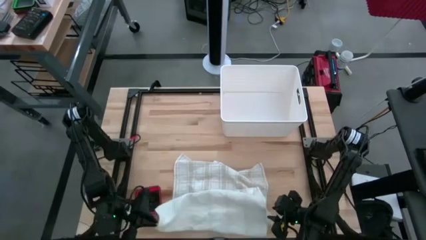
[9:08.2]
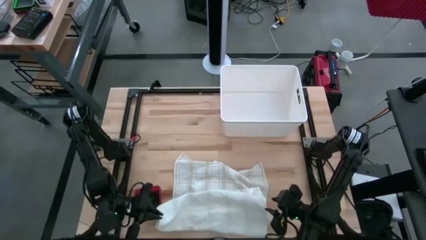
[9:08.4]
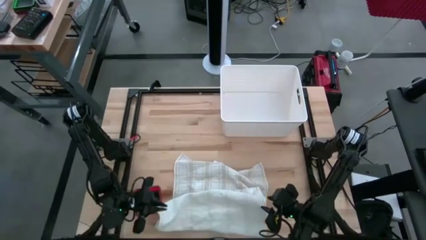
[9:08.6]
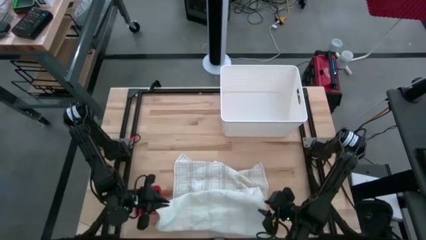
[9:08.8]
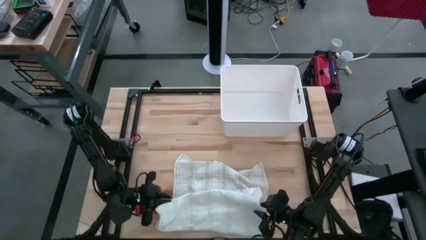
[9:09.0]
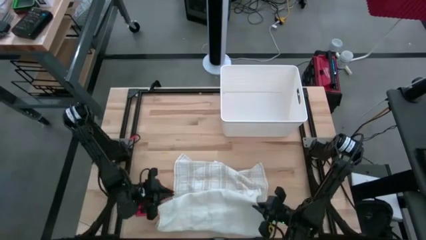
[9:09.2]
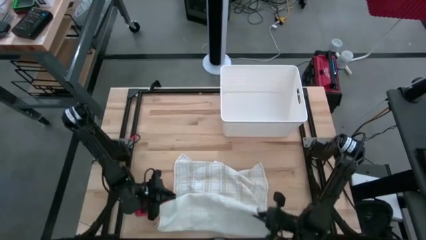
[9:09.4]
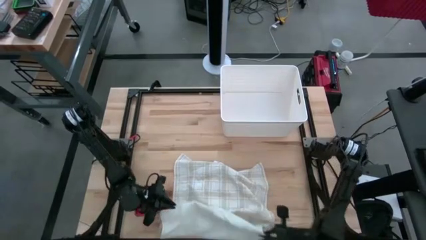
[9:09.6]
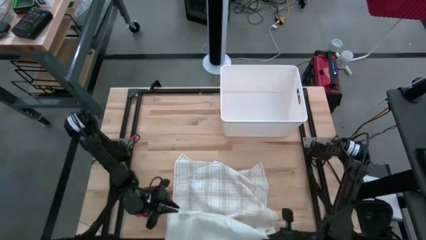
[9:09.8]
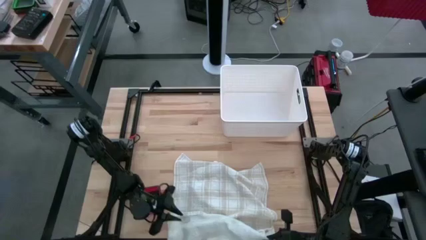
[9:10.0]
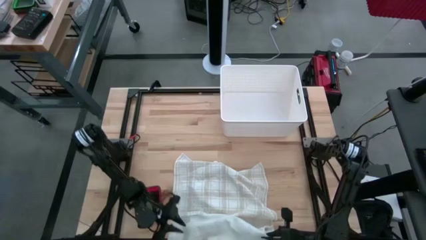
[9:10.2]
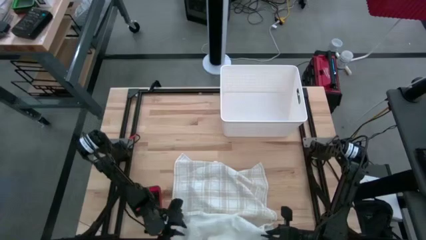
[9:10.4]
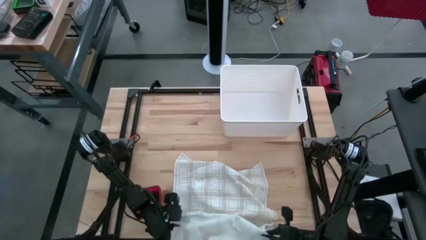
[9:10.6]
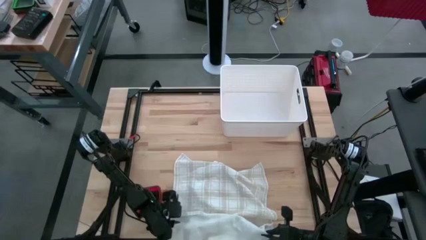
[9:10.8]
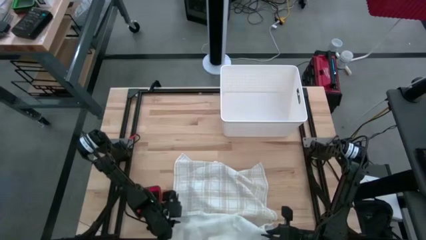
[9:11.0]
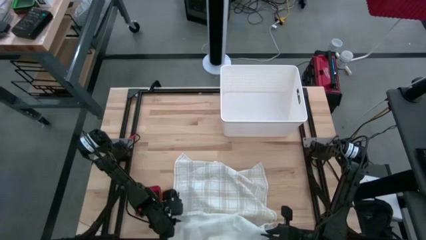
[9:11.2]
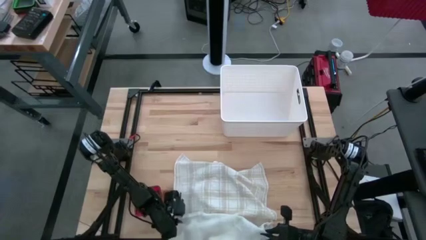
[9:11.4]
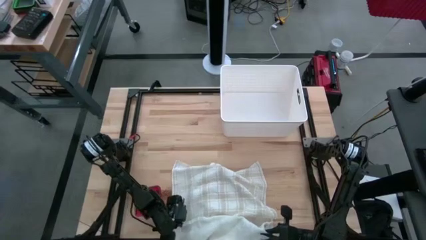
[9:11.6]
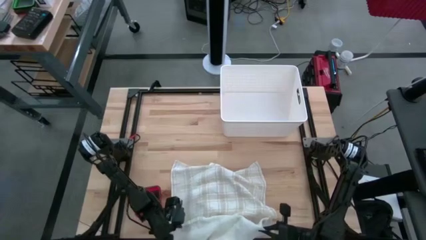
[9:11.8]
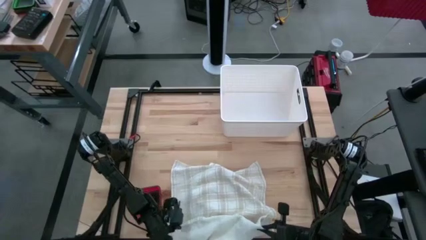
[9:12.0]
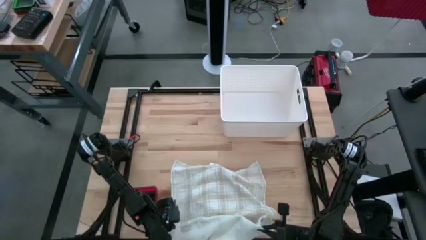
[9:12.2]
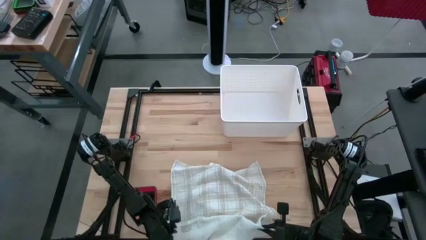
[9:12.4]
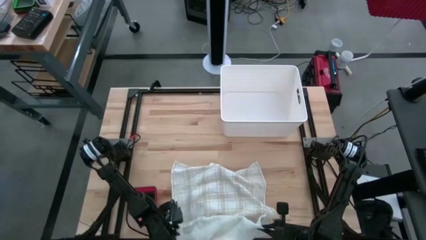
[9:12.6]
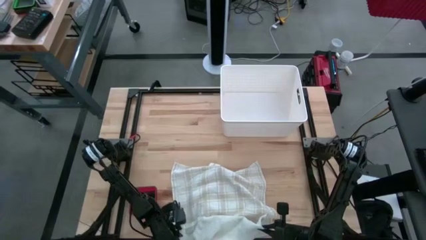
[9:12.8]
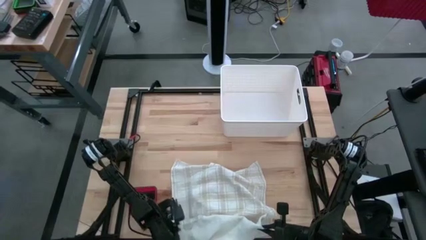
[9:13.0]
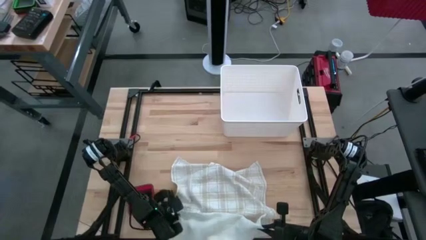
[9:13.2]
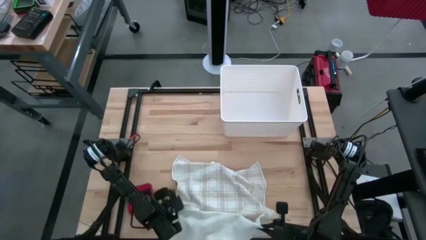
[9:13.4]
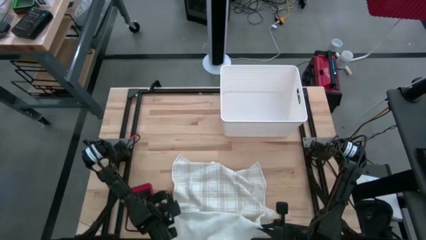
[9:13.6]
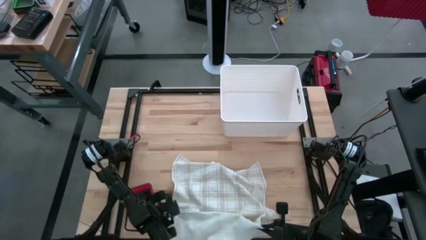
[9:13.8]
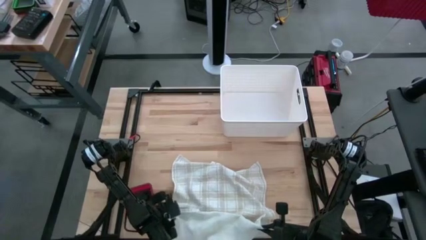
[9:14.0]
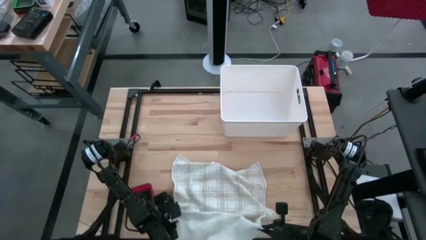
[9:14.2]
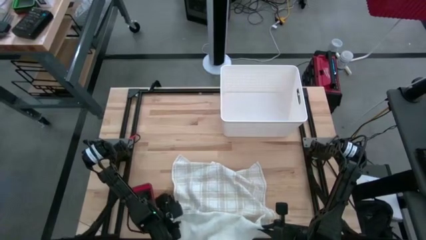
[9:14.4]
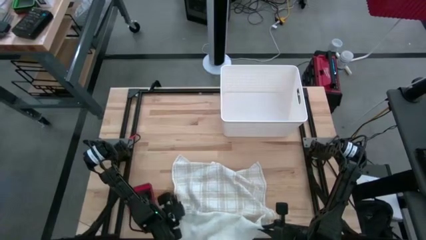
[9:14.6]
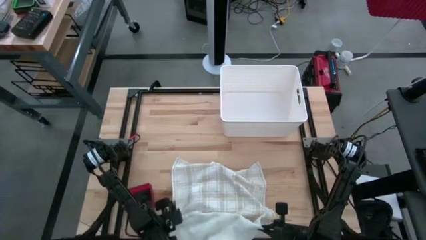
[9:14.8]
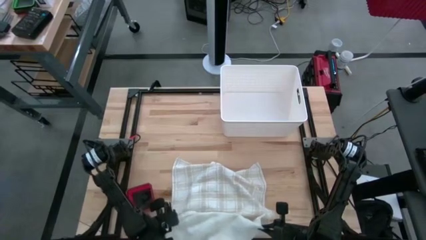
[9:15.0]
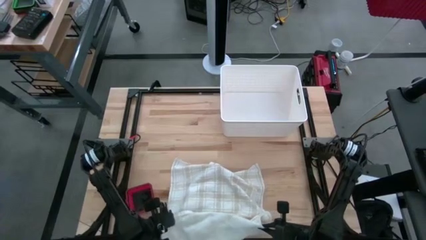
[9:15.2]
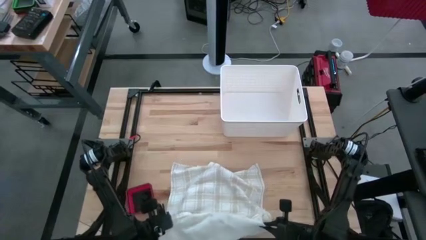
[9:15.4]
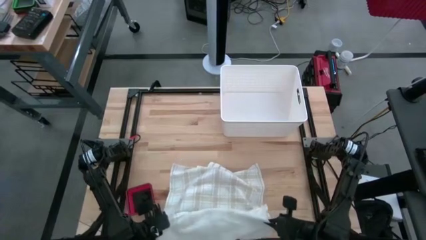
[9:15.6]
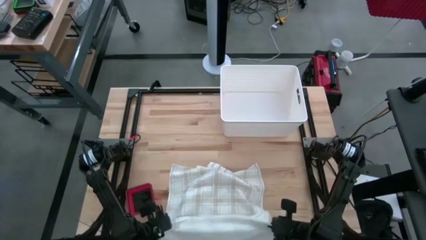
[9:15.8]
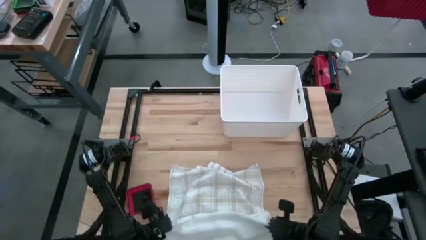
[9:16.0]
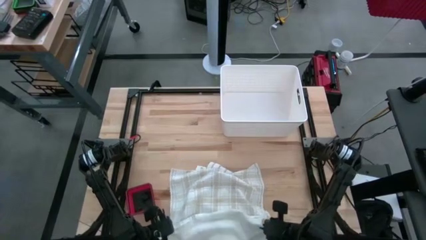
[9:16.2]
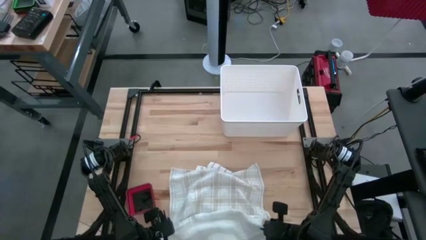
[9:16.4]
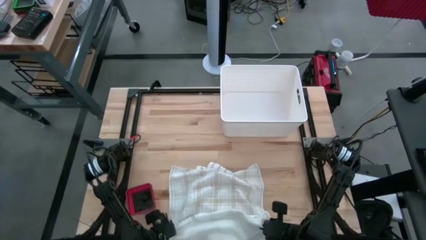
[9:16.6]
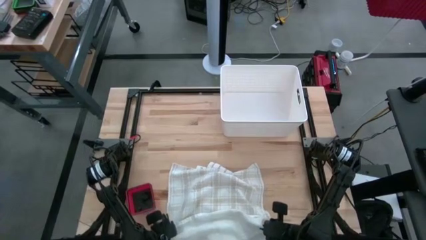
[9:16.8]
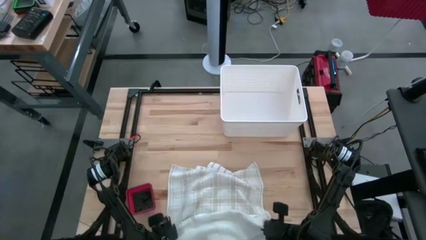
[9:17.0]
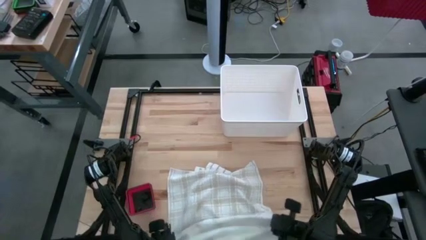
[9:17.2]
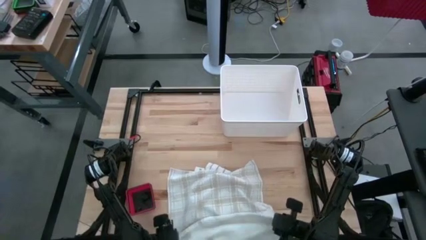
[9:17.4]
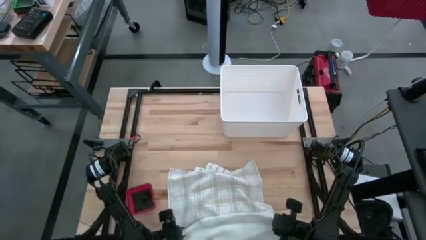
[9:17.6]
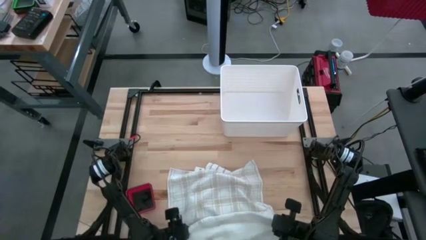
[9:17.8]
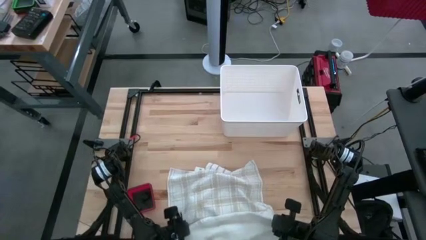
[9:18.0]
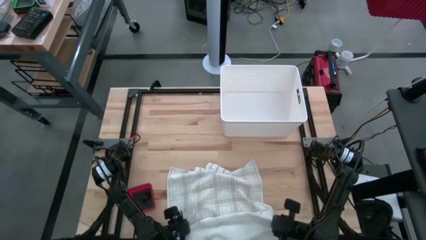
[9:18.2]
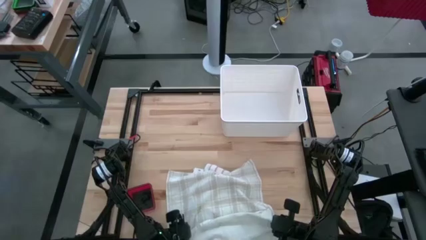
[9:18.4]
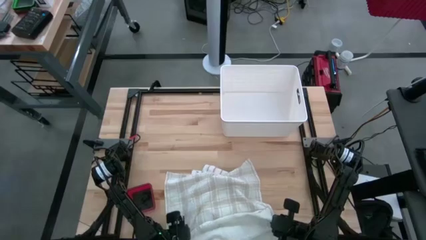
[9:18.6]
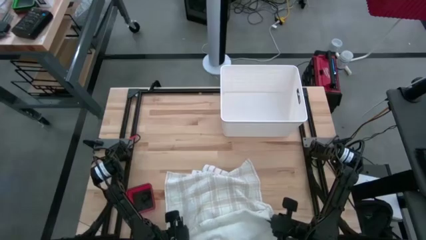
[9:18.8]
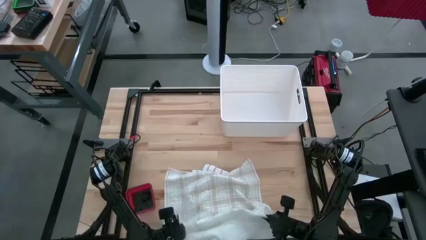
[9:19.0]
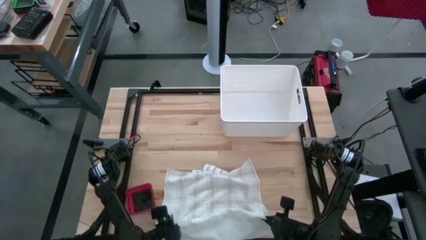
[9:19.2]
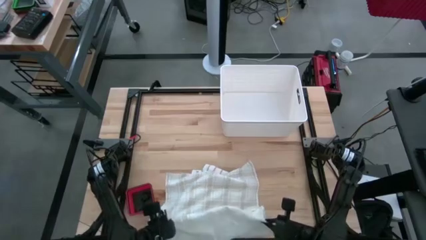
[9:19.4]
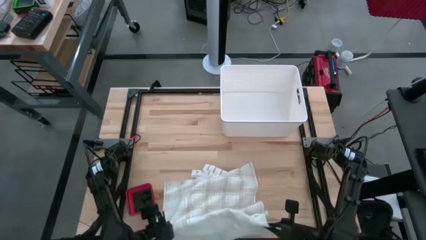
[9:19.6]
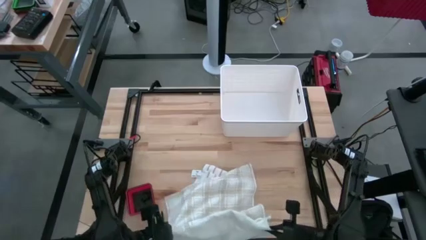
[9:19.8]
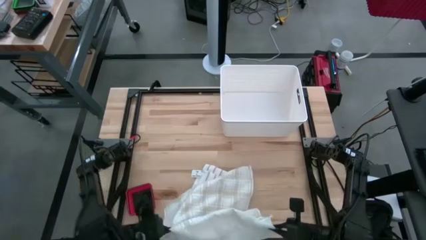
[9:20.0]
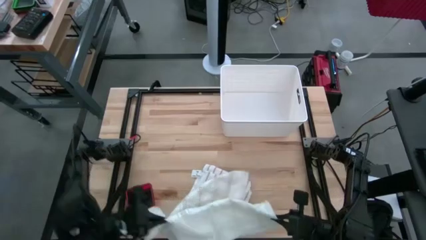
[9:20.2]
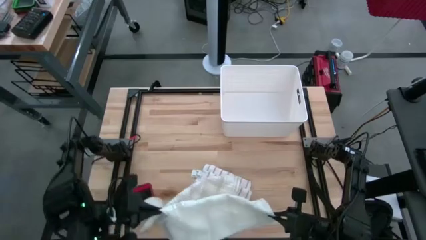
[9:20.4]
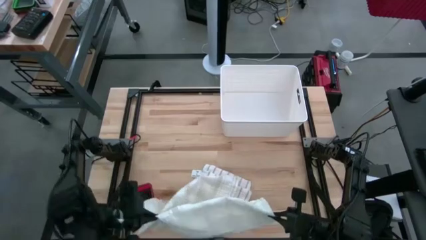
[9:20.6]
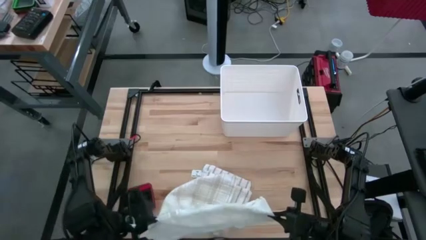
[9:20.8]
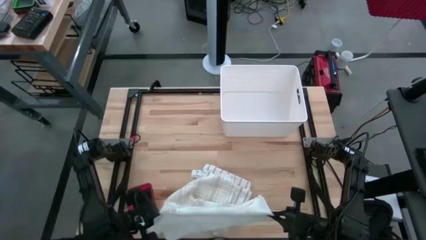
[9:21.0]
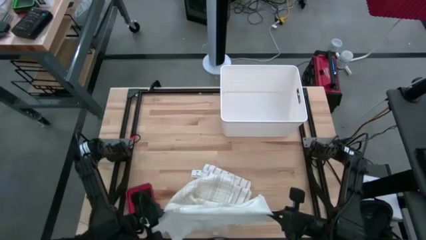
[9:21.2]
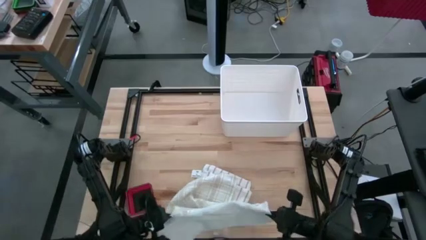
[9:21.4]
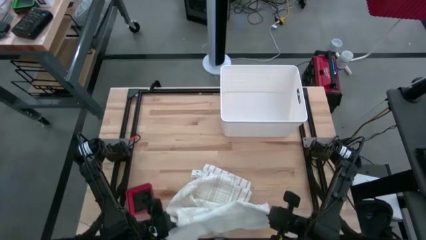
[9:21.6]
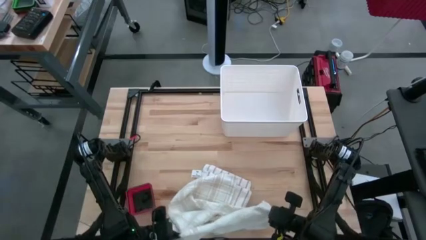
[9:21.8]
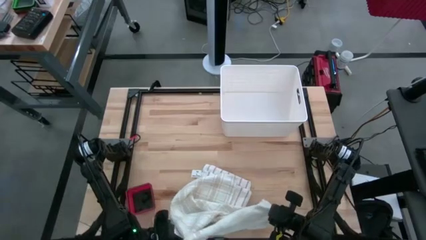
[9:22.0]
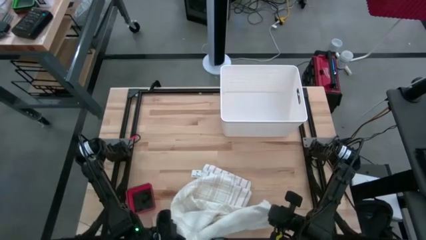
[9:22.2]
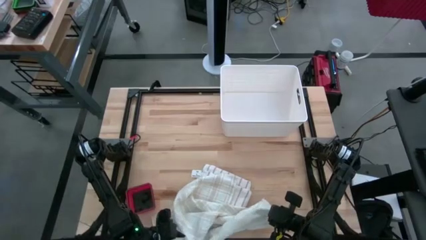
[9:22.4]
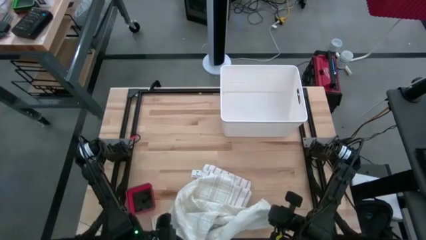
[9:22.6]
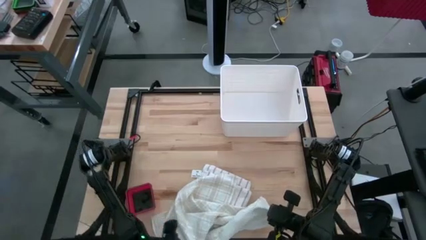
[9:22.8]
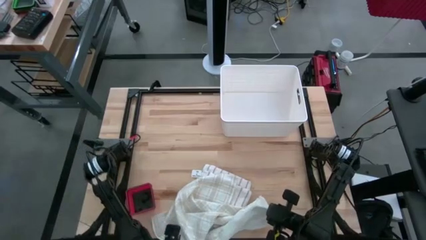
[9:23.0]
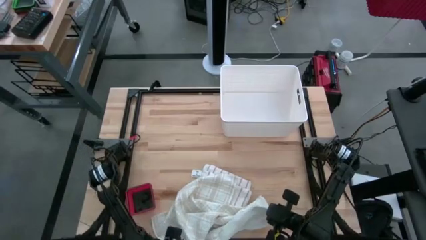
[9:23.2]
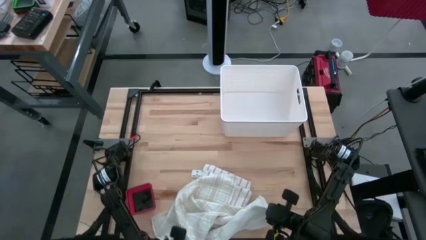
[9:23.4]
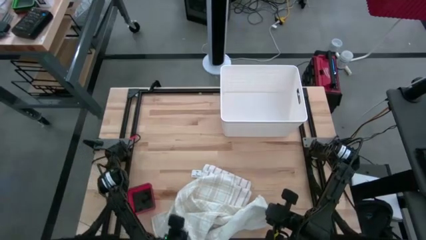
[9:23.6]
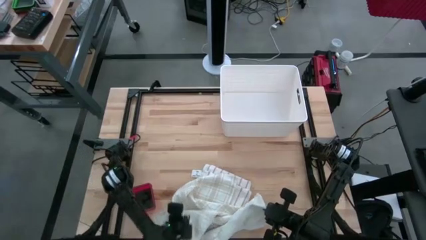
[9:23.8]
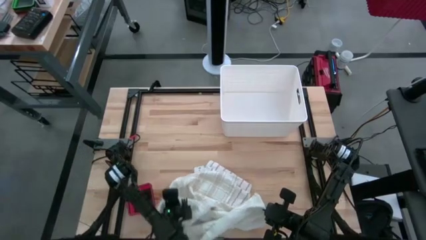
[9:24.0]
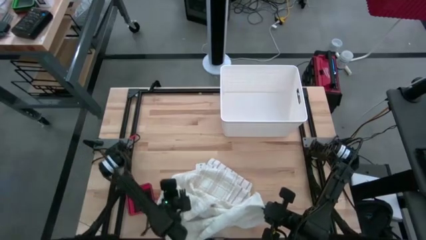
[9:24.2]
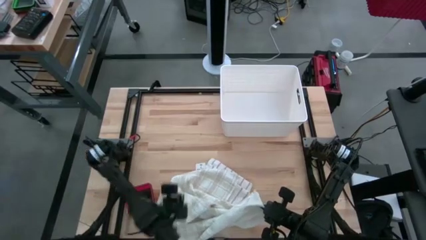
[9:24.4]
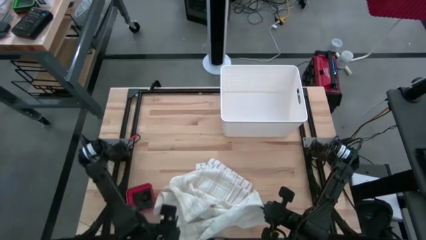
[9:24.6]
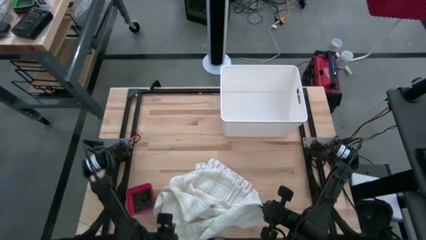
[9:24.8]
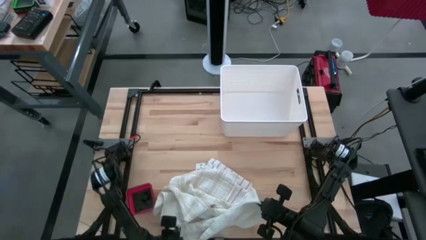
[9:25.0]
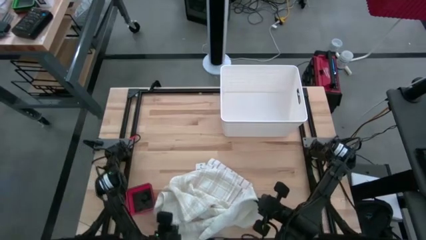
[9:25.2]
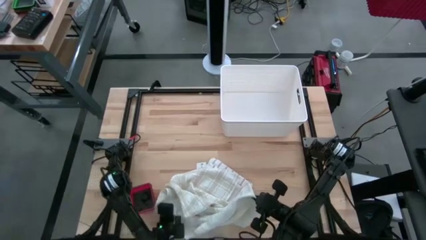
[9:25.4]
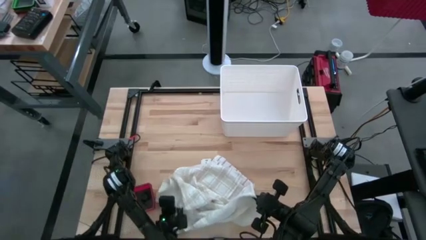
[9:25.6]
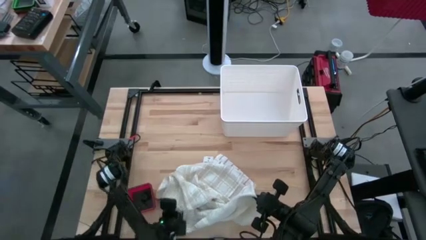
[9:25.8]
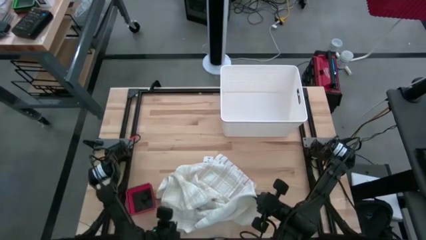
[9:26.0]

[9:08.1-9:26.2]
Task: Fold towel
Fold the light brown kitchen towel
